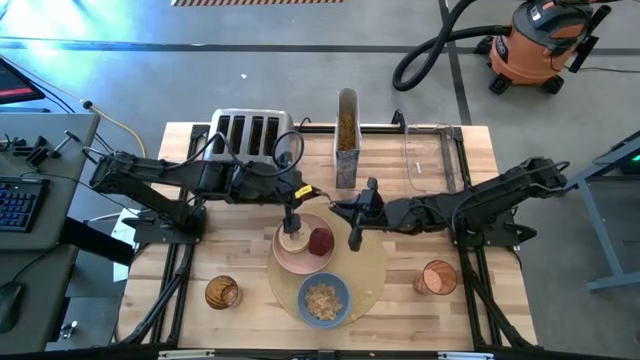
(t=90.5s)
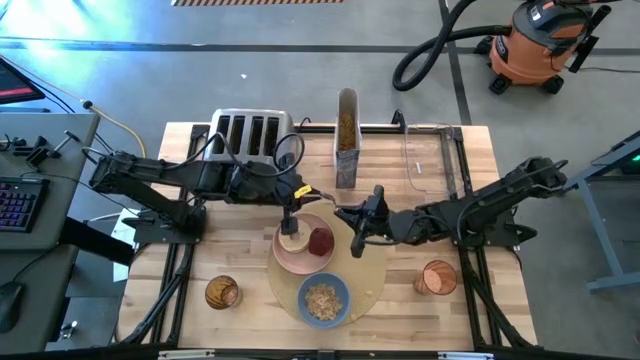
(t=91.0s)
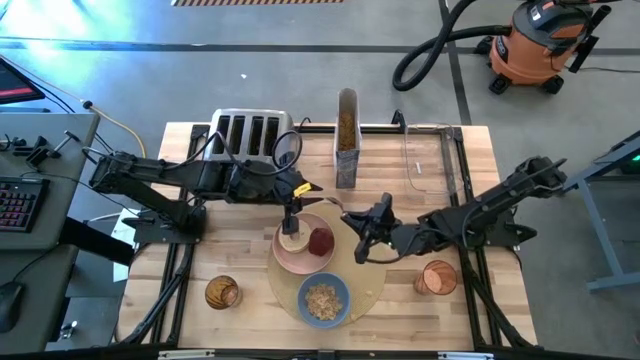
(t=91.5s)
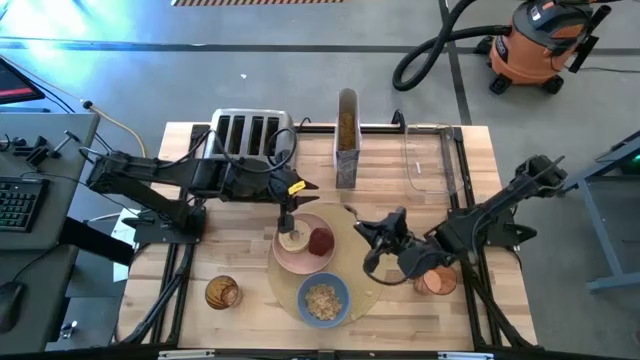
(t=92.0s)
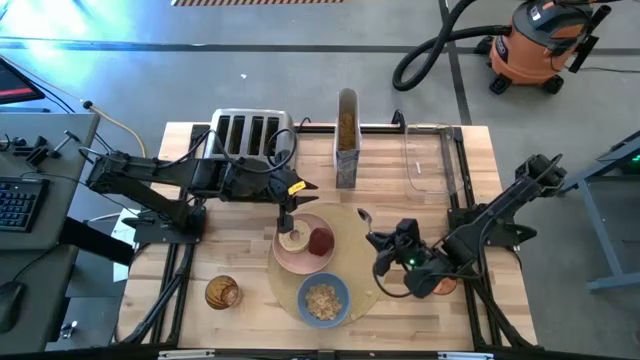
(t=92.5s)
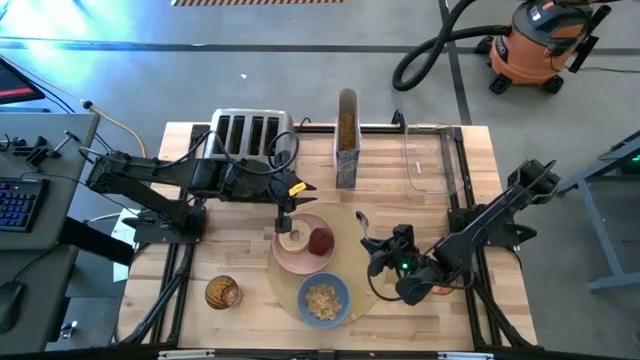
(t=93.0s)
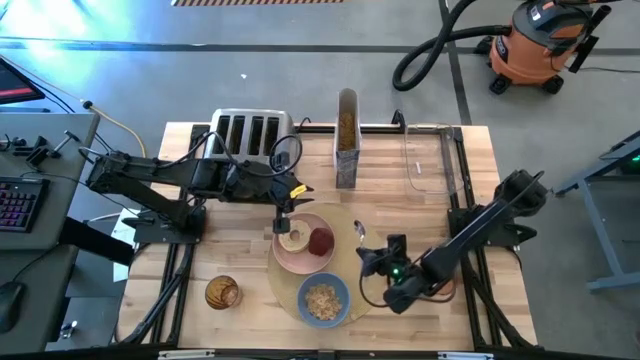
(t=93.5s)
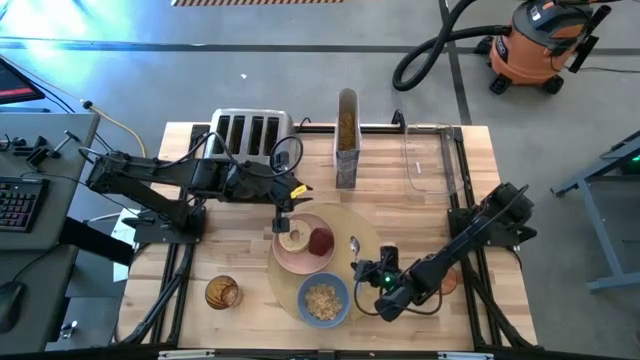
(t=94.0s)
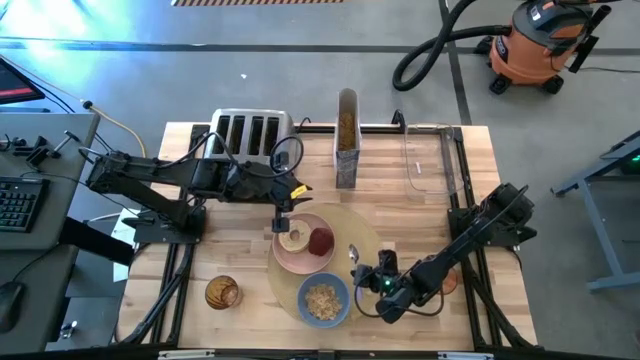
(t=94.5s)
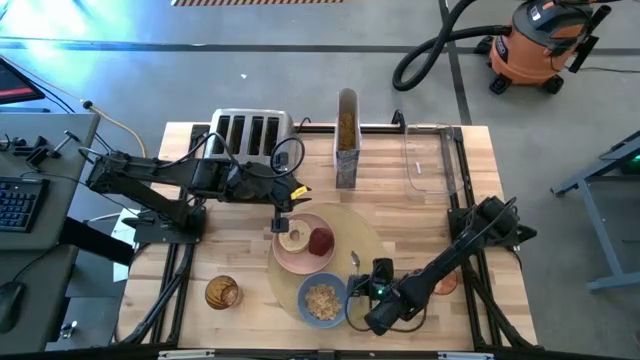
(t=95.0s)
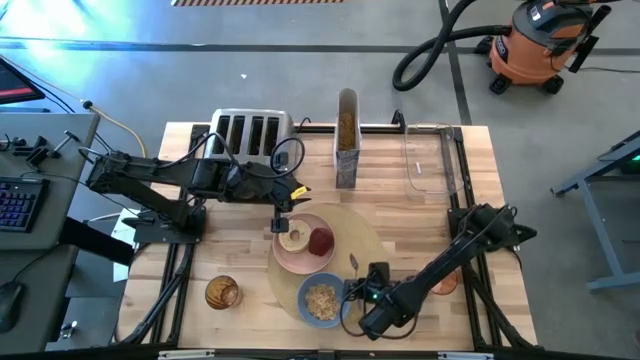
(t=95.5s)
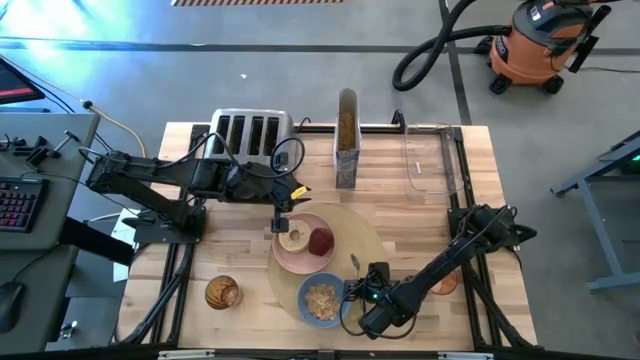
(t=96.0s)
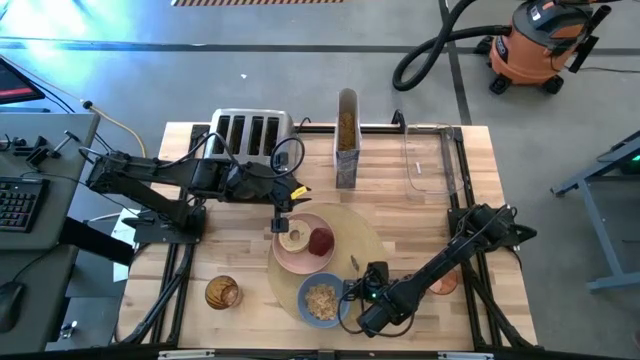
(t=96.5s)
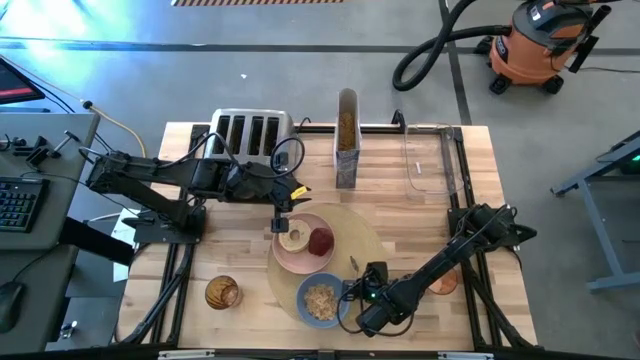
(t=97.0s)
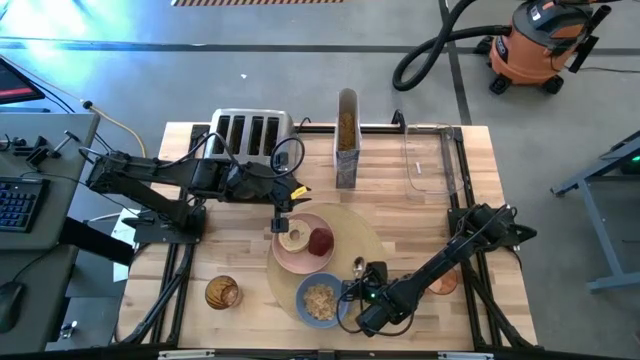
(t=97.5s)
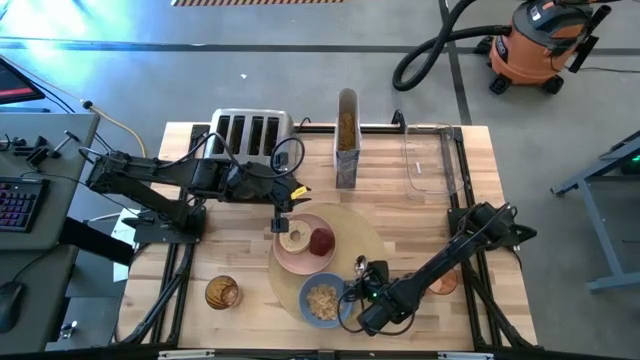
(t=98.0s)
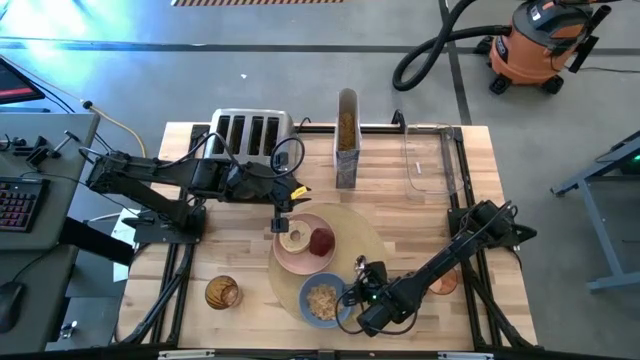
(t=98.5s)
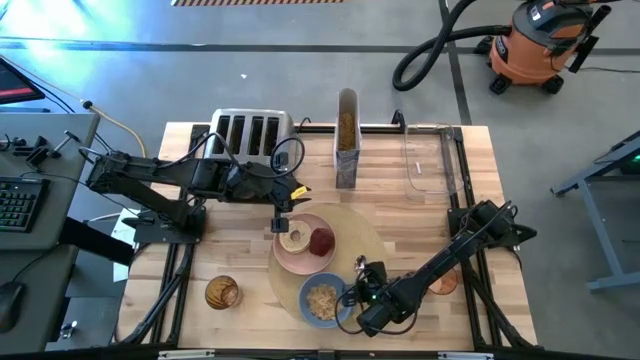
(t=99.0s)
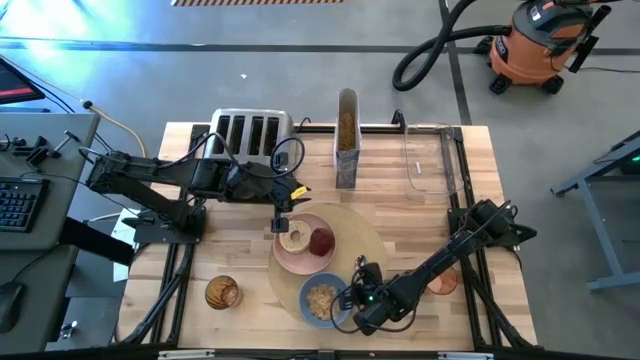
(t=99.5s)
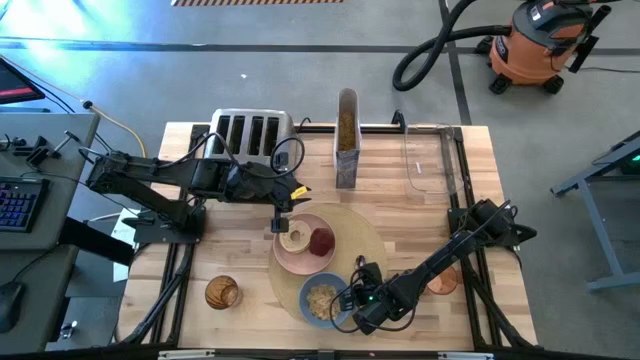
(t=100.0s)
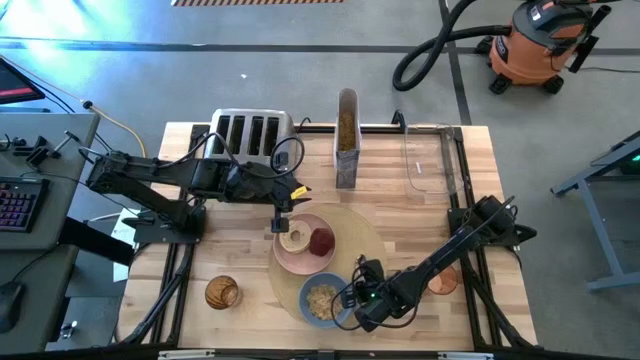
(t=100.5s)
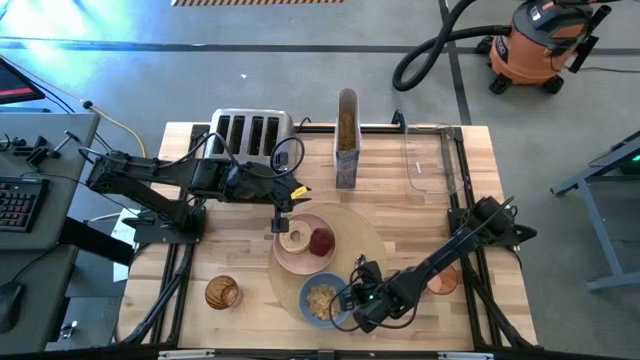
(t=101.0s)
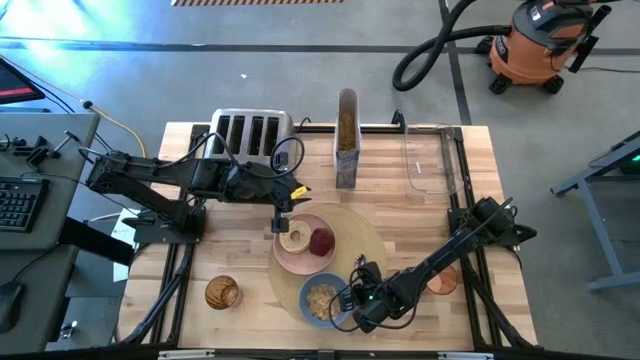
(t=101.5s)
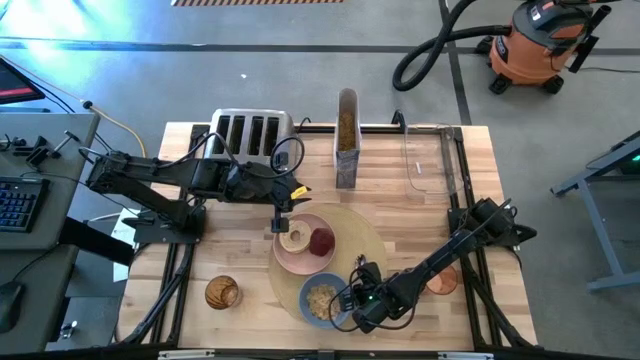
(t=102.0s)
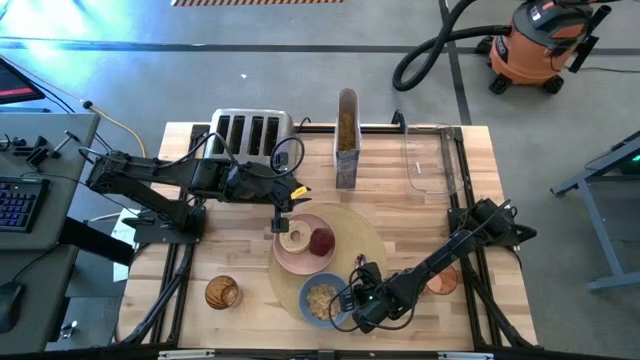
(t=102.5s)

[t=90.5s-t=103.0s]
Task: Arrange a breakfast setting
Put the spoon on the brown tablemat to the right of the blue bowl

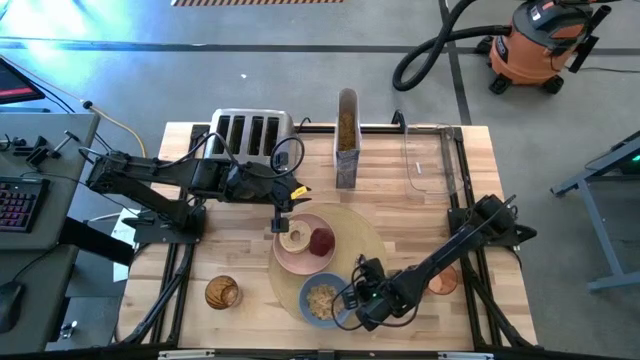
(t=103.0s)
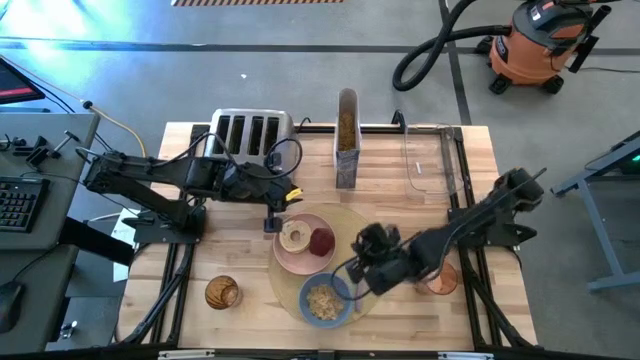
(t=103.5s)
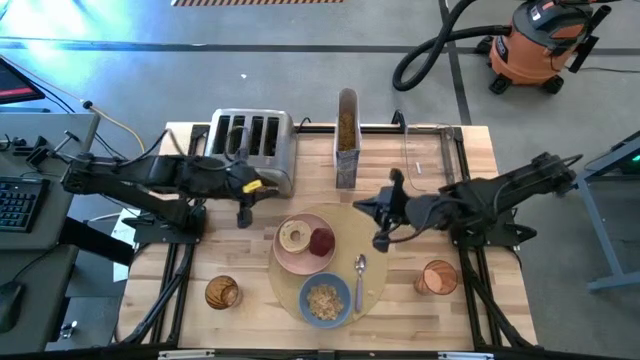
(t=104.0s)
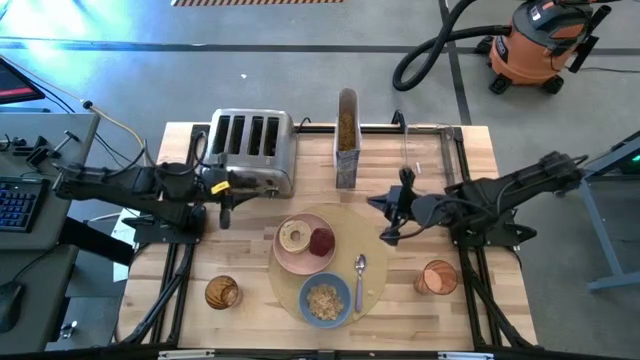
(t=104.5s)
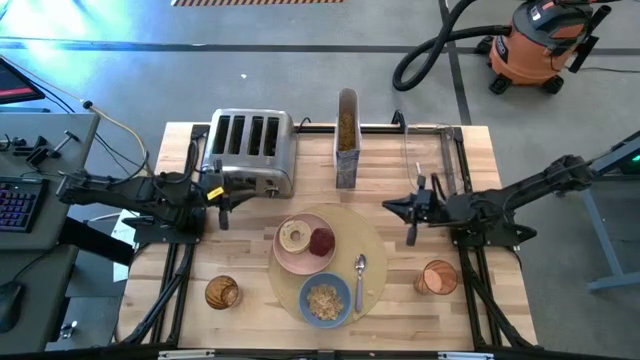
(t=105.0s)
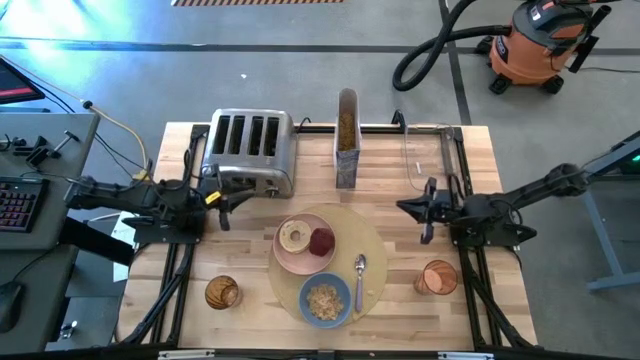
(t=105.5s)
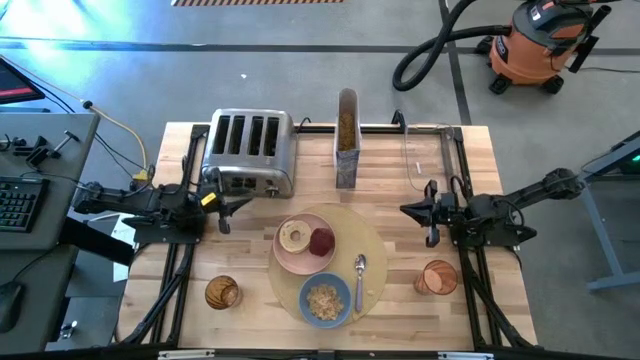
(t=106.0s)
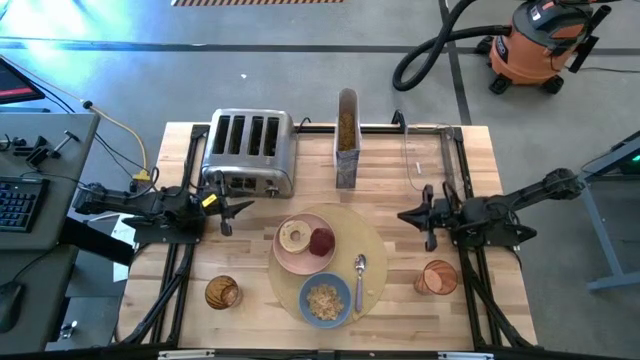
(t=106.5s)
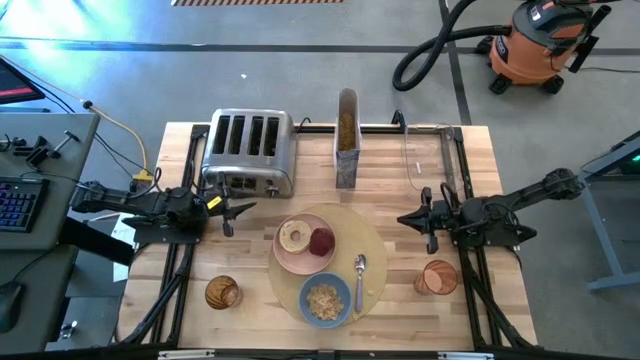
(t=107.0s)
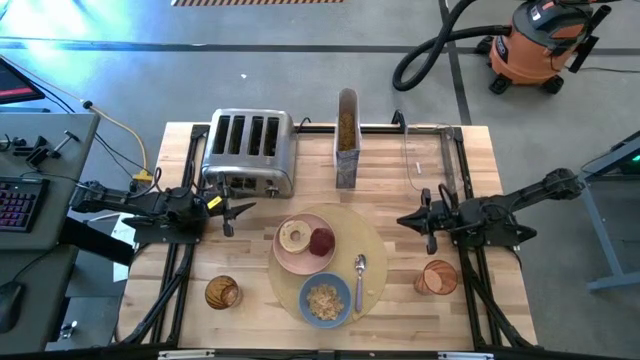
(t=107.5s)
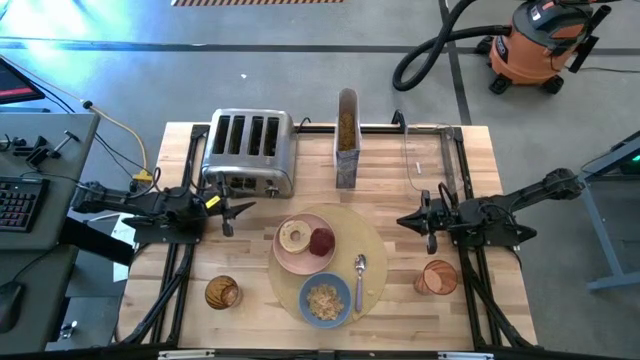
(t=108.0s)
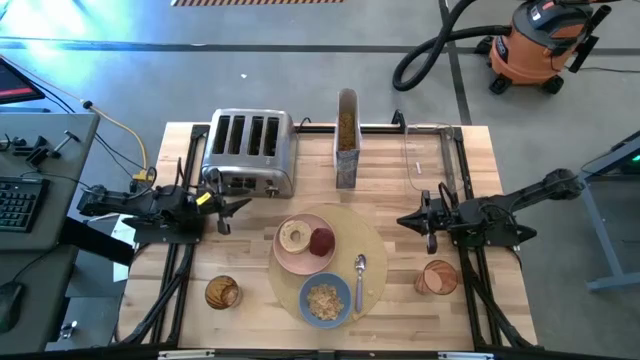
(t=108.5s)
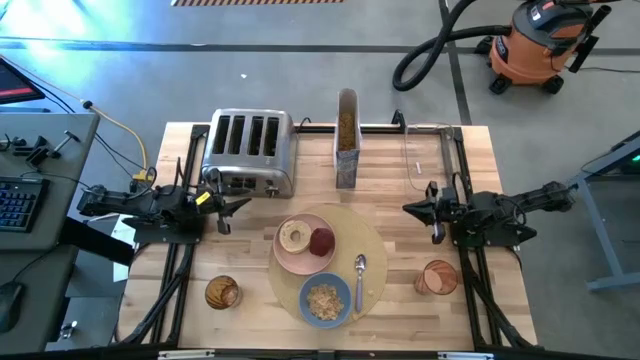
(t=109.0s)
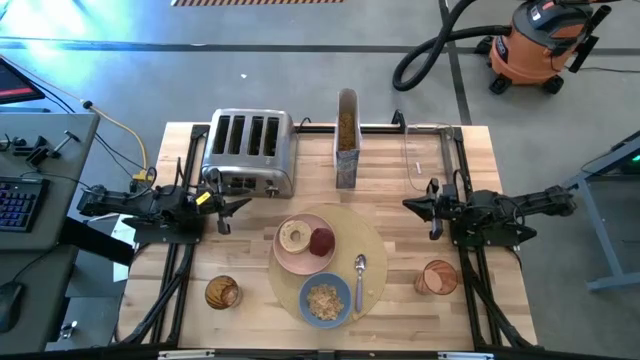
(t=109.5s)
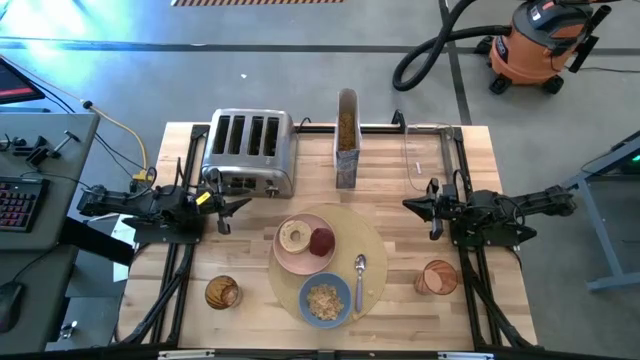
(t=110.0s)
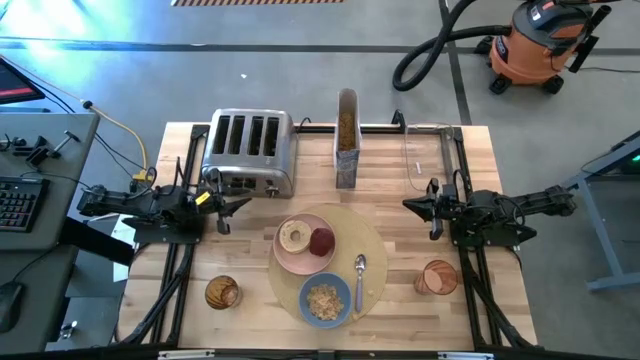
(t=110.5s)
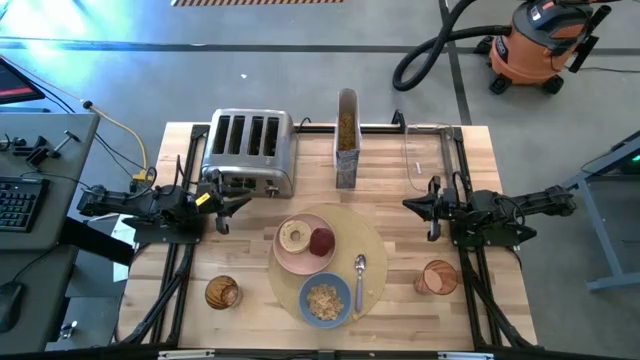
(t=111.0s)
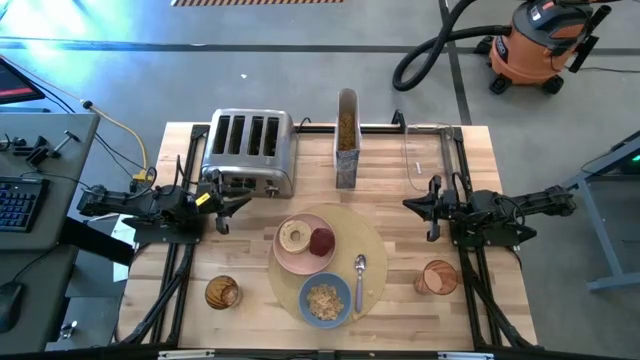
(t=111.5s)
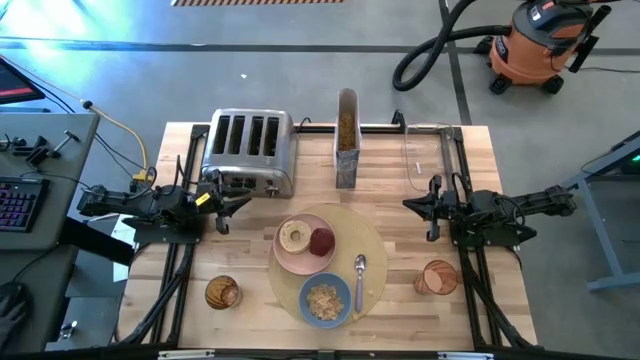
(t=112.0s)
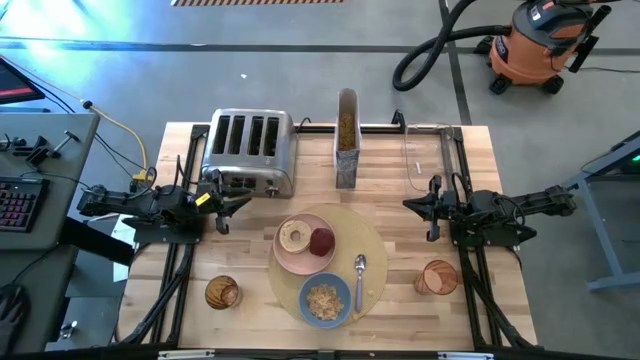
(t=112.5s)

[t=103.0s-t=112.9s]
Return to home position
